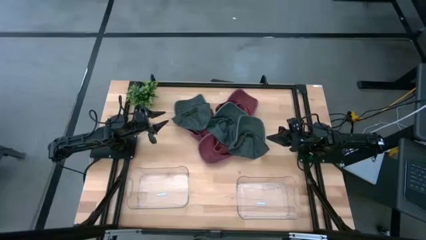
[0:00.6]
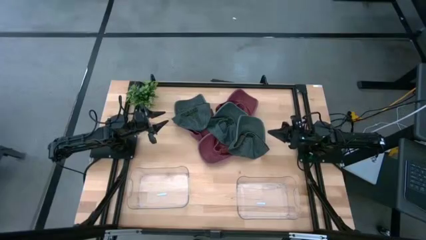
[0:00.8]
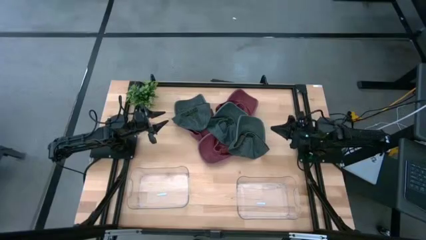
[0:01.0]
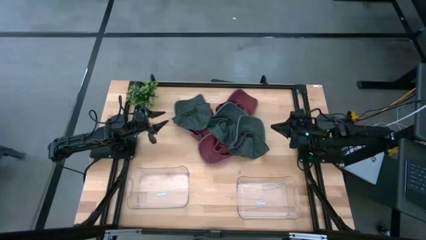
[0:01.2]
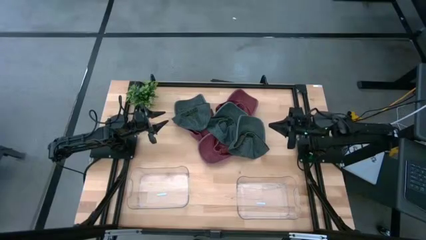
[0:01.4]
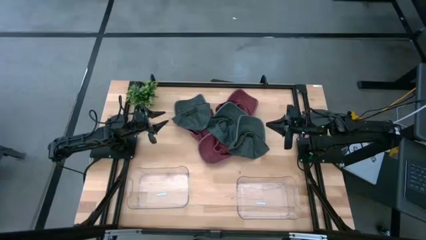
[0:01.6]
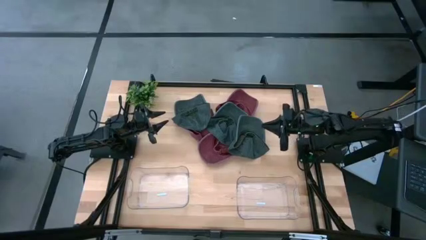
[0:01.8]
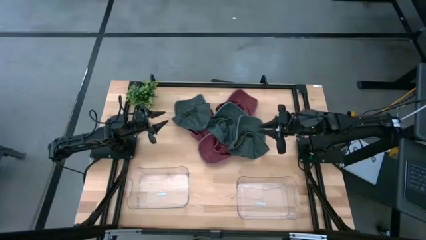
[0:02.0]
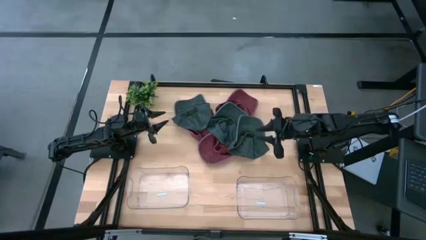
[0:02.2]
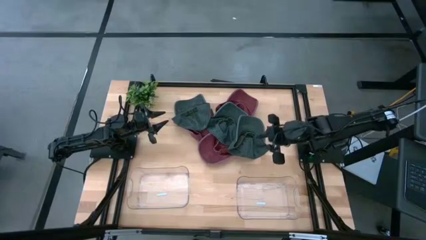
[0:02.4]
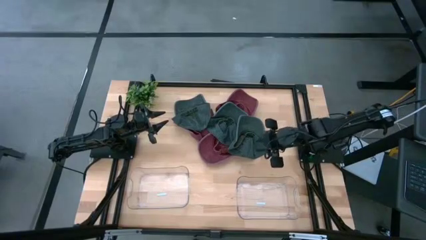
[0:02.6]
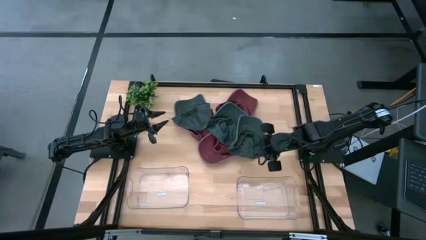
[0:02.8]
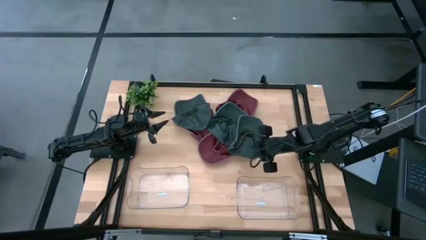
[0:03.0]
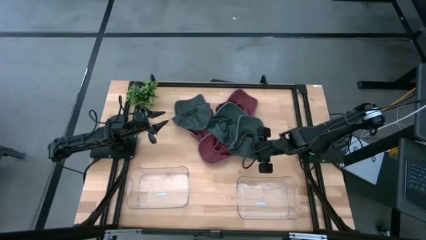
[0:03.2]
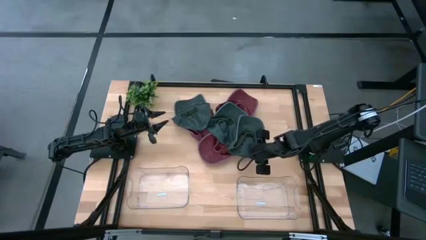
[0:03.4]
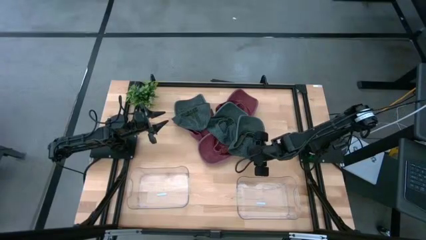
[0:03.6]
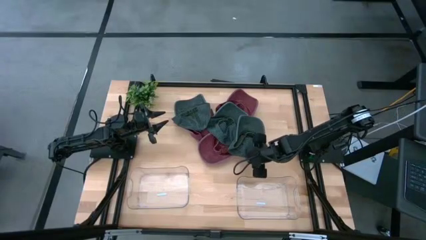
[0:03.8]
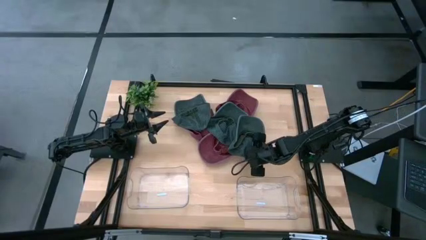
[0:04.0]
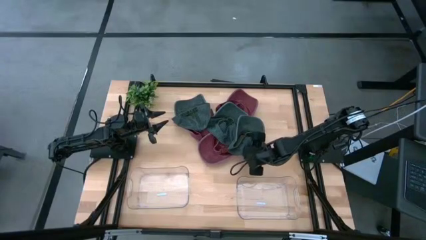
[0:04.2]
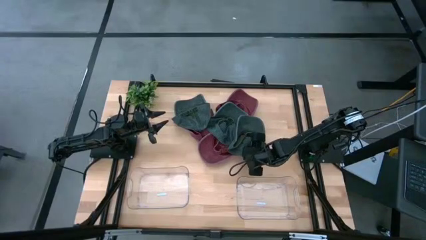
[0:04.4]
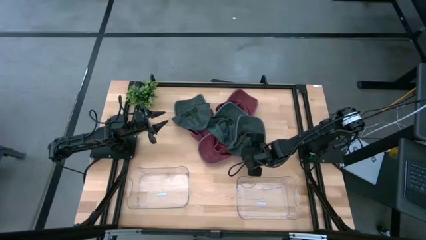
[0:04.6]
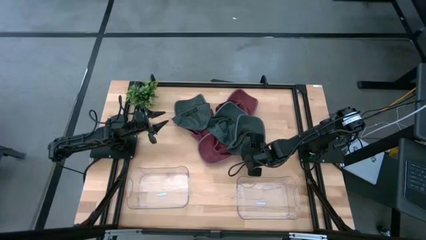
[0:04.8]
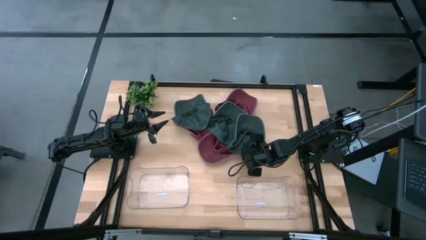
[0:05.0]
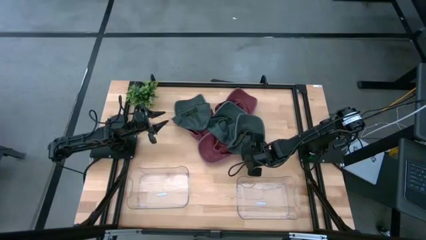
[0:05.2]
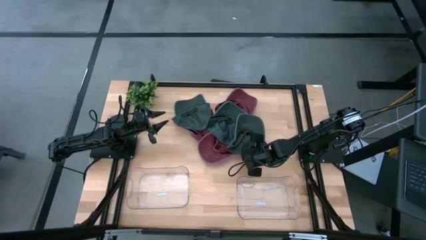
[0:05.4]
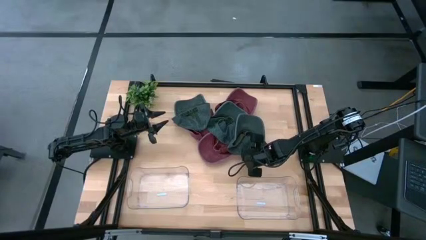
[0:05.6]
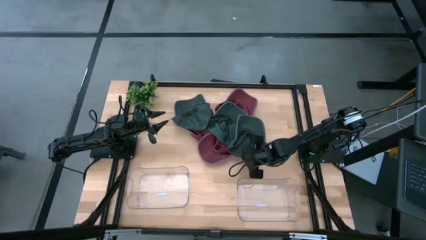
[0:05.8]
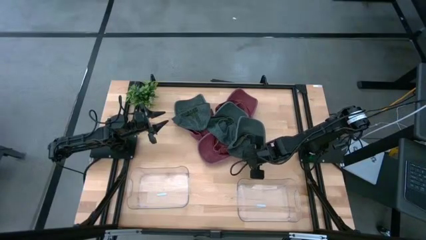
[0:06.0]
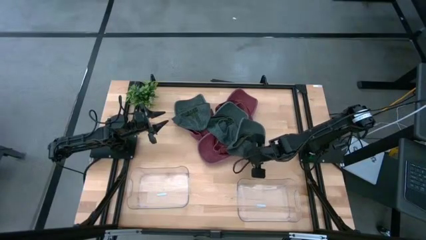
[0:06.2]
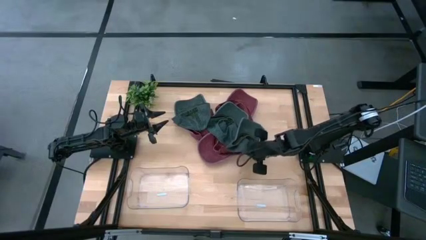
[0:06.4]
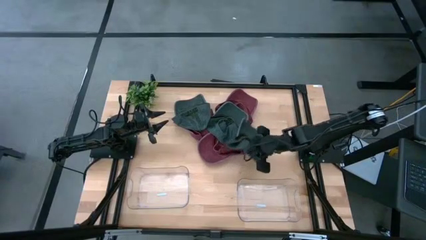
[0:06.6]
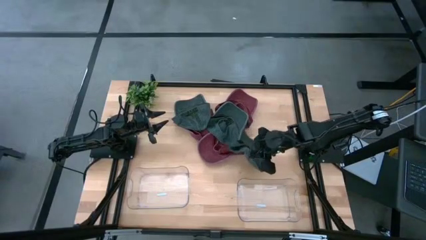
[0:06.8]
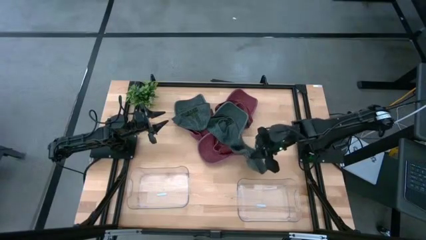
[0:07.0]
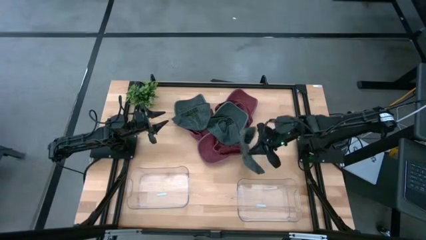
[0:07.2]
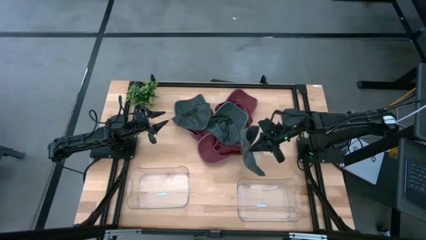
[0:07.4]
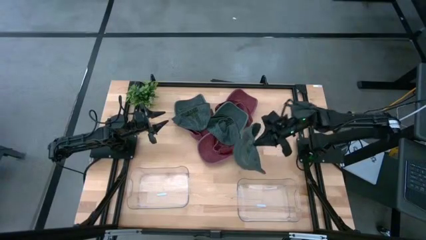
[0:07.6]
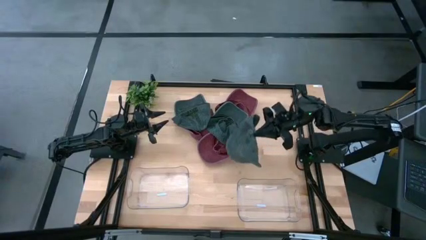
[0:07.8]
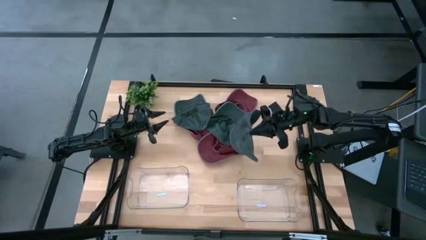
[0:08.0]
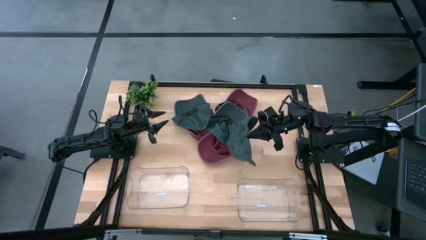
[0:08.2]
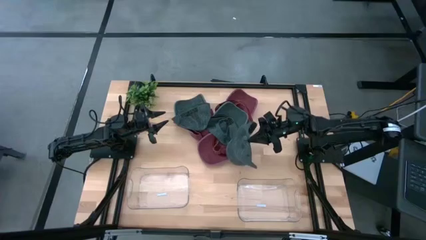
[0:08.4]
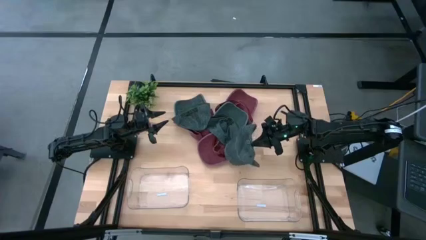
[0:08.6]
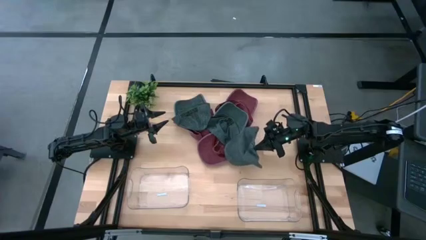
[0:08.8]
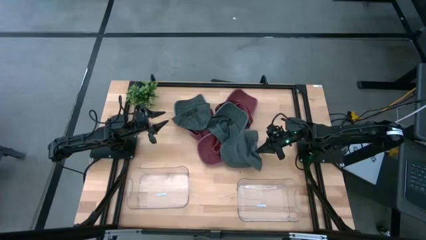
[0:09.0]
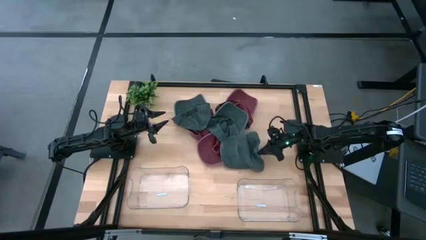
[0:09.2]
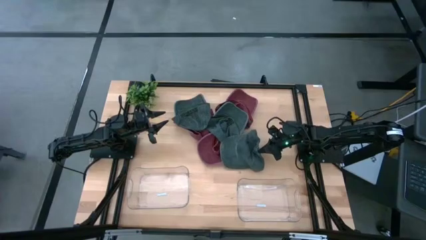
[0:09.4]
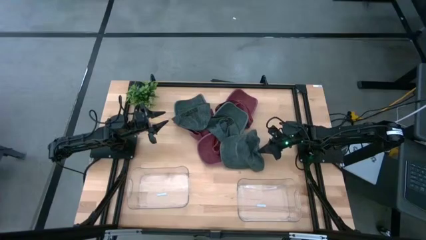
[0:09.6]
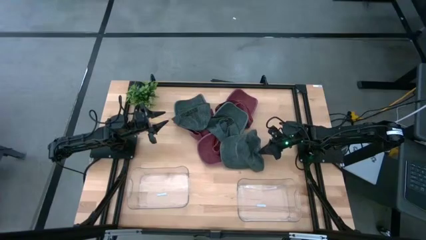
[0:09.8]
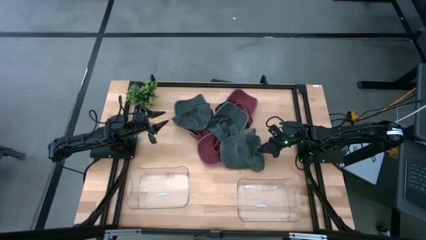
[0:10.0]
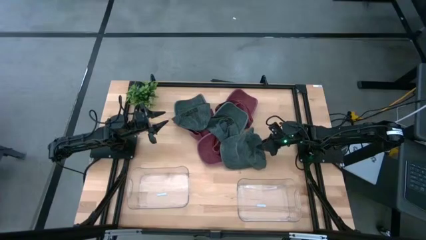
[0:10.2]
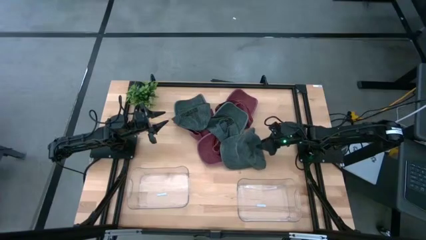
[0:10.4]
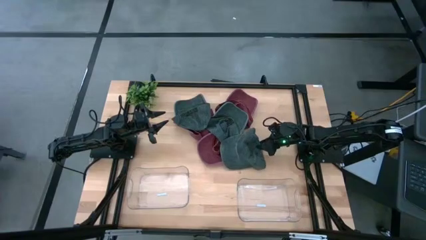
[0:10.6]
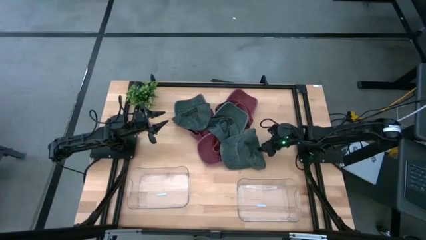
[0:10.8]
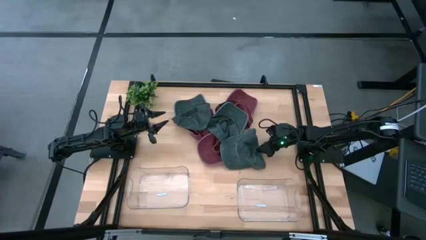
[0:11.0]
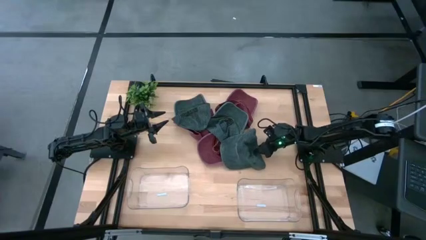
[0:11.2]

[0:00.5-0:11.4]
Task: Pick & Place hat
Put the bottom right black cap into the right transparent bin

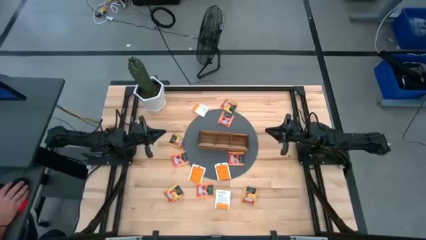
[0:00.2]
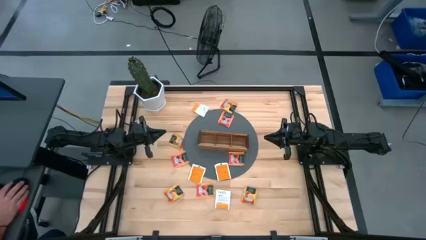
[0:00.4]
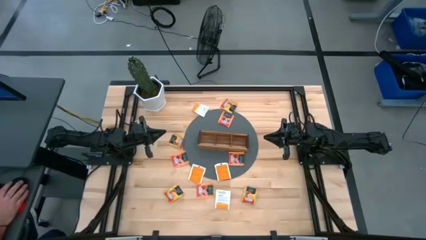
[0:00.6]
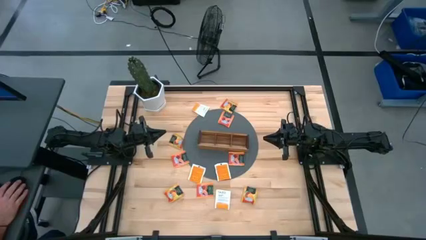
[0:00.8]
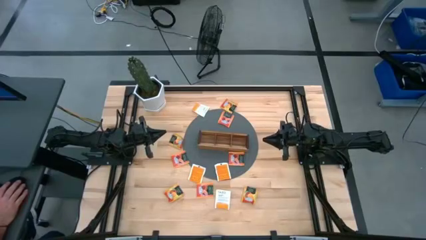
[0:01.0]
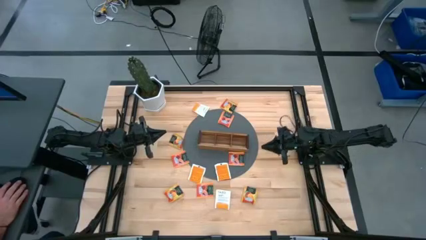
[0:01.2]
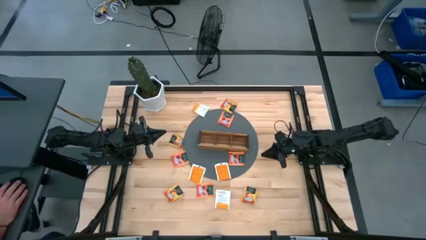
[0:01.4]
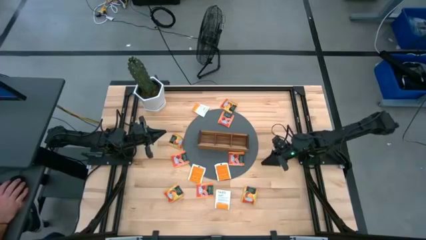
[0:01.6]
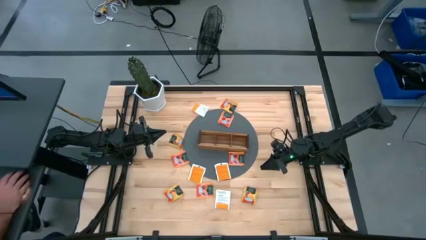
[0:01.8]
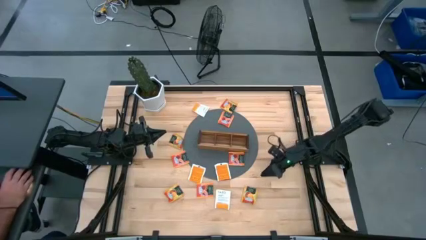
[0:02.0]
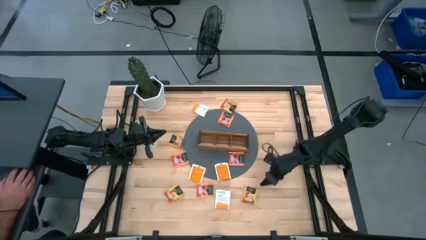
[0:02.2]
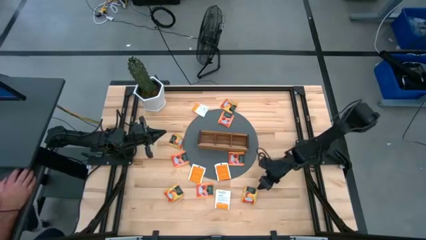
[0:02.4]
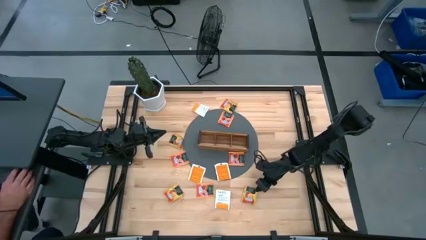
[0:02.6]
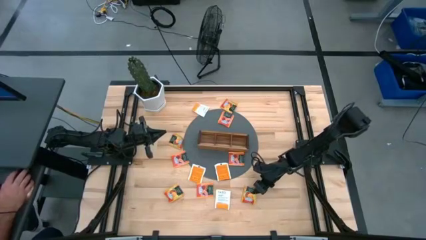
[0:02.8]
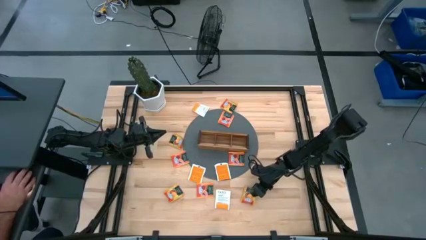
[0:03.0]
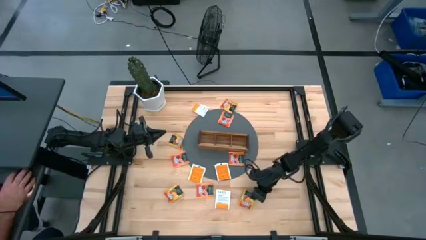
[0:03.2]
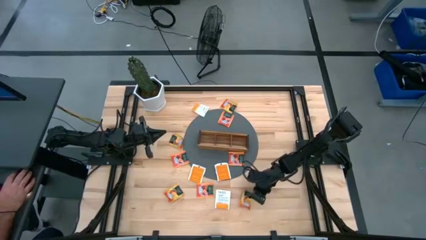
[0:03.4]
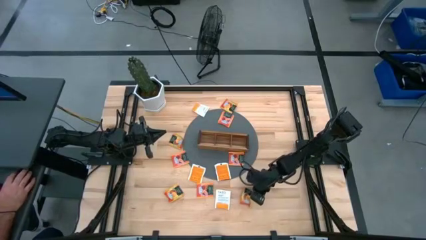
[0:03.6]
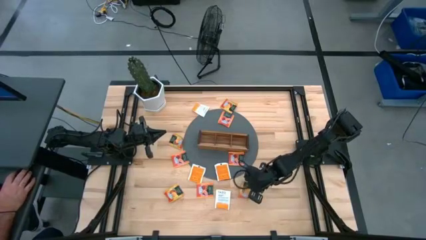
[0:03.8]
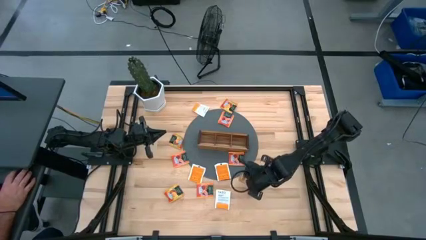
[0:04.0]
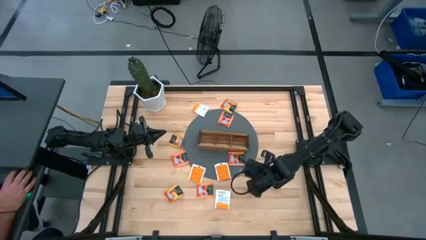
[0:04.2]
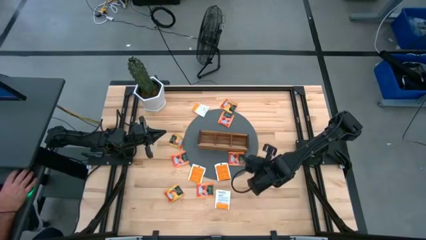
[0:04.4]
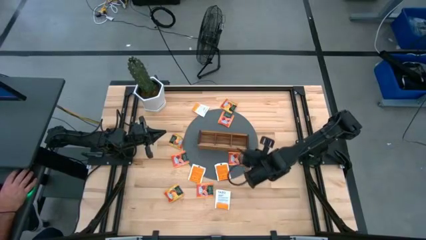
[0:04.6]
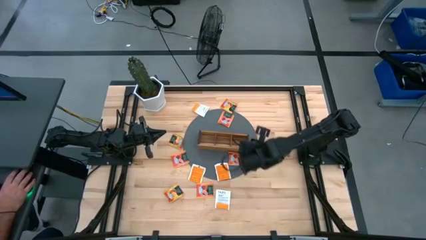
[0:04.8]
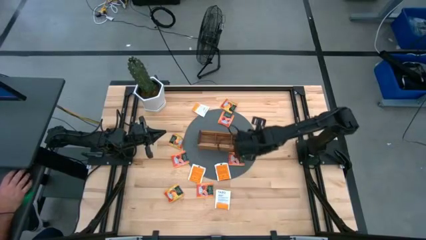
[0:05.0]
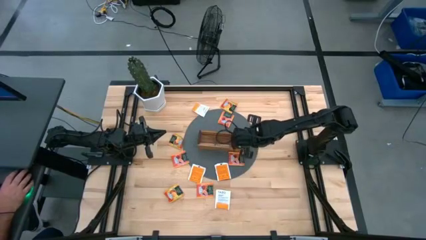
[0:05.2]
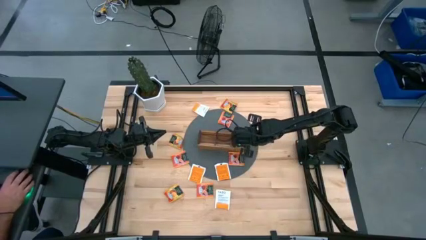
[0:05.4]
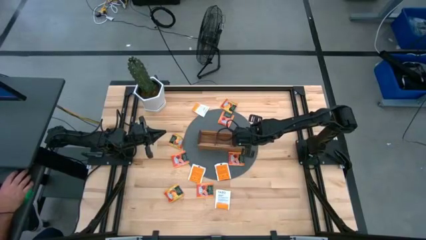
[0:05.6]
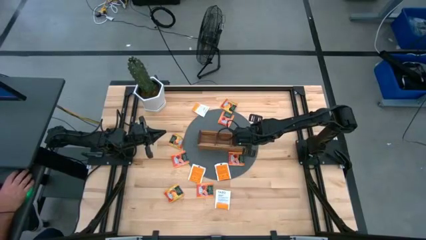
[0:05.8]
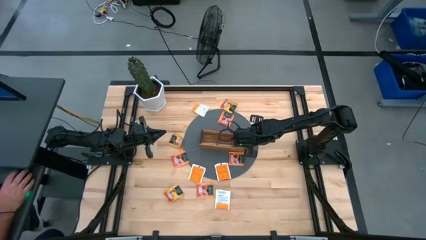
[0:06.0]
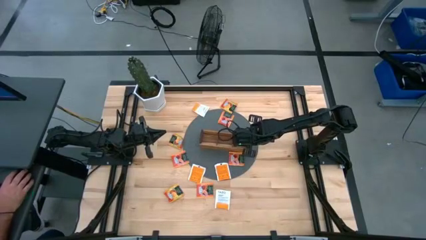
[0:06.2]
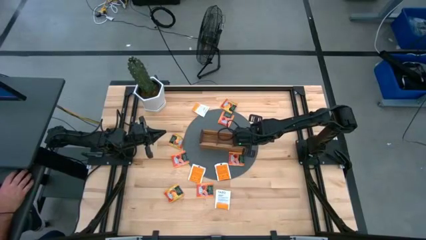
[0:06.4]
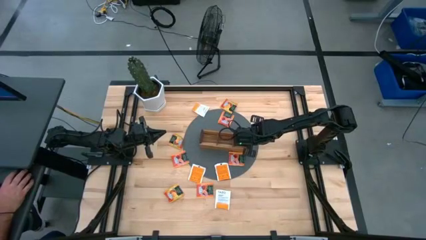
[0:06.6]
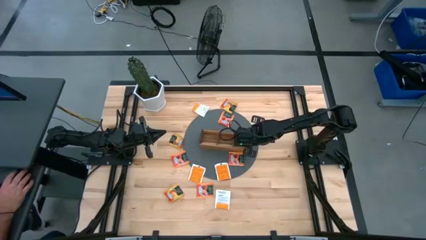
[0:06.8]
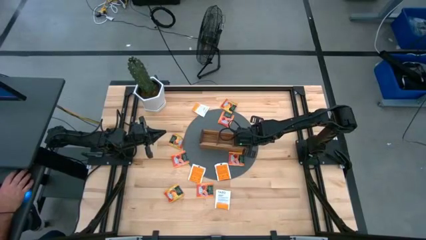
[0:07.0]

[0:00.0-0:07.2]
Task: Pick & Place Tea
Put the yellow tea bag into the right section of the wooden organizer
